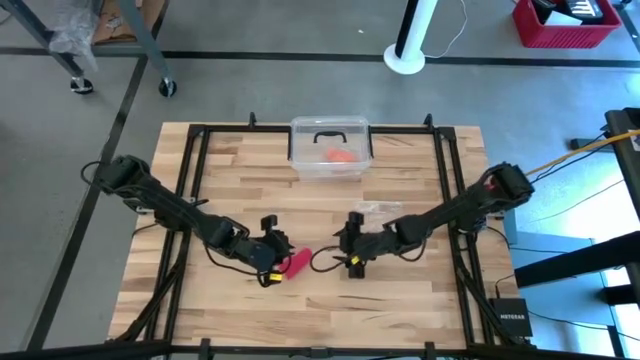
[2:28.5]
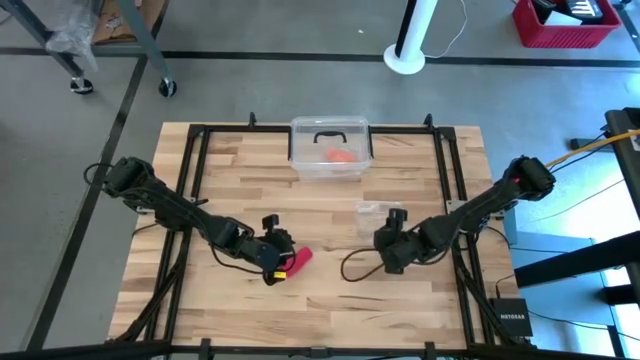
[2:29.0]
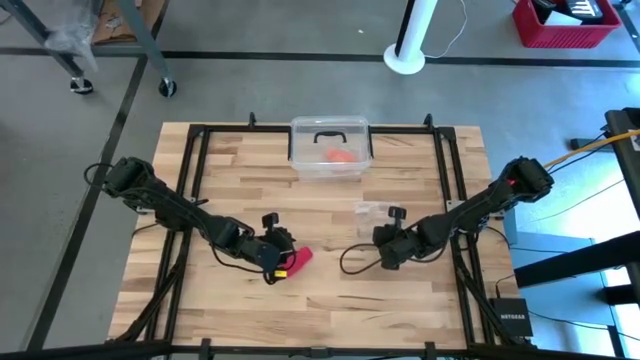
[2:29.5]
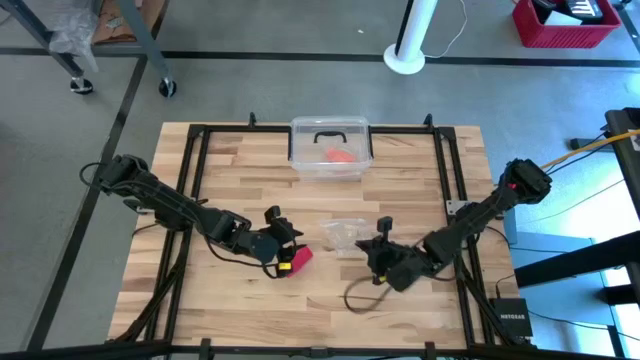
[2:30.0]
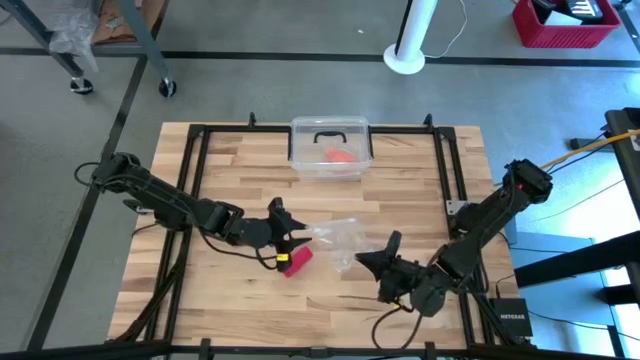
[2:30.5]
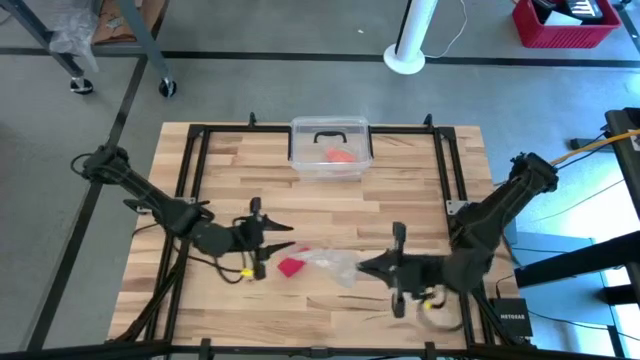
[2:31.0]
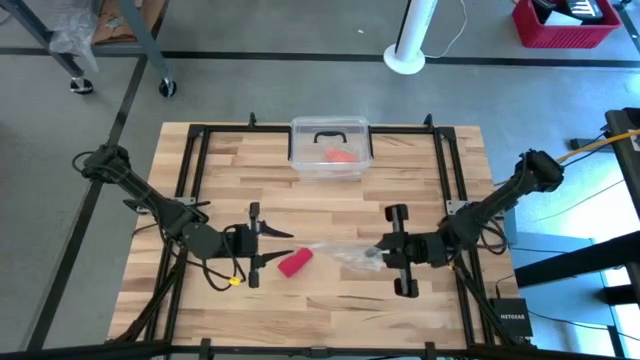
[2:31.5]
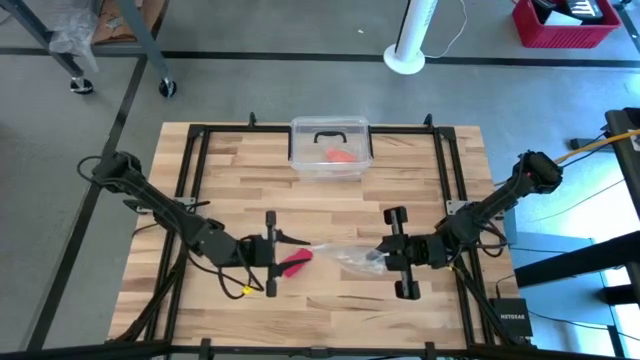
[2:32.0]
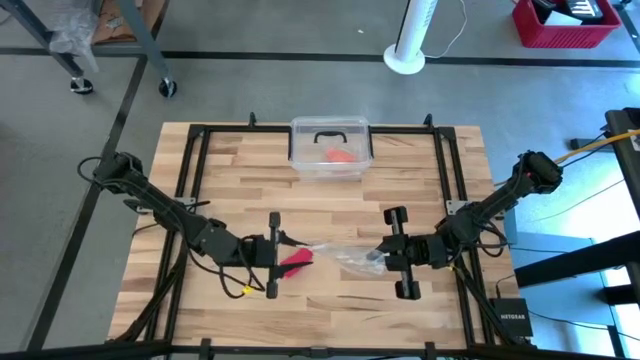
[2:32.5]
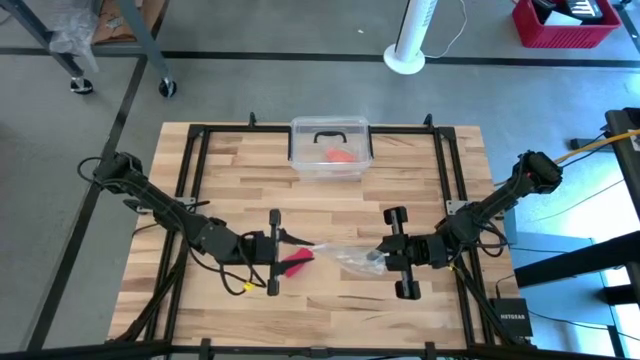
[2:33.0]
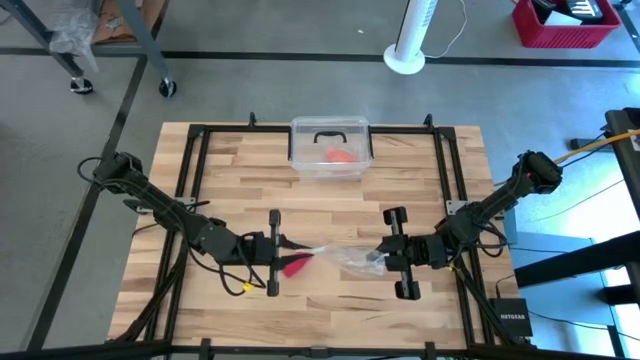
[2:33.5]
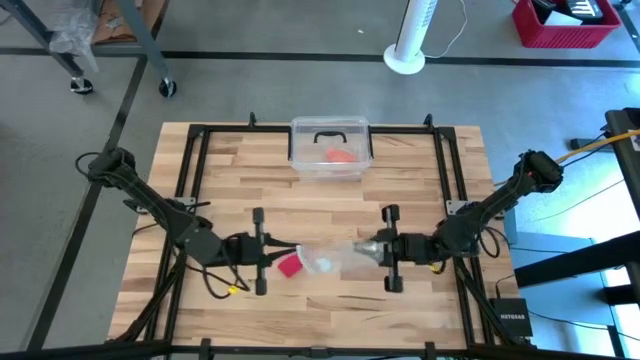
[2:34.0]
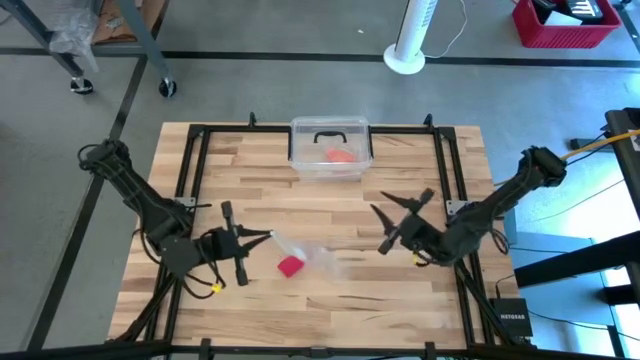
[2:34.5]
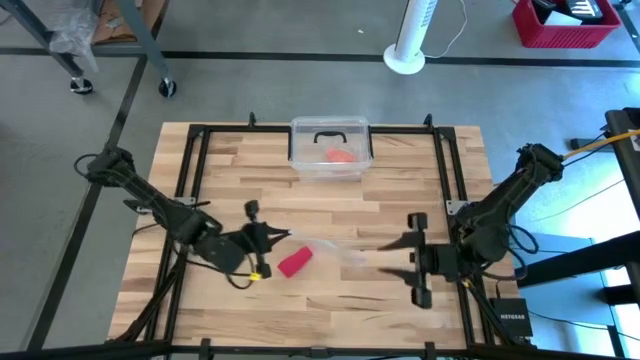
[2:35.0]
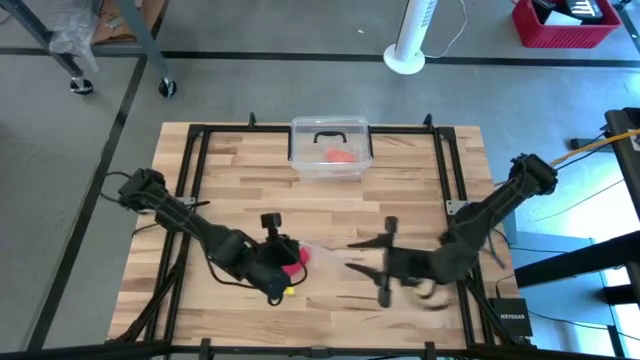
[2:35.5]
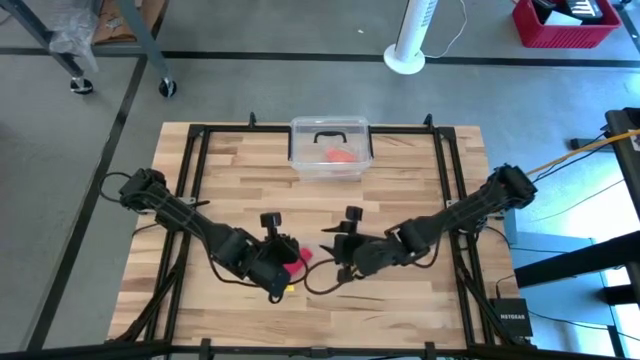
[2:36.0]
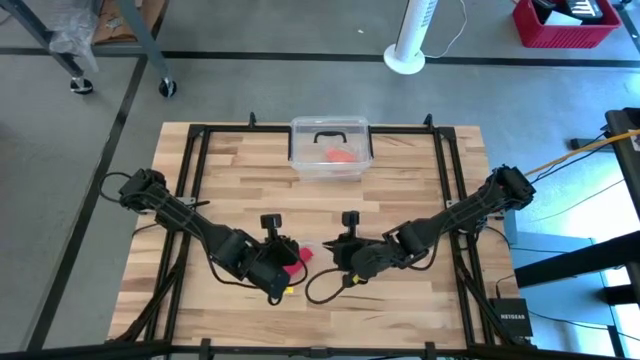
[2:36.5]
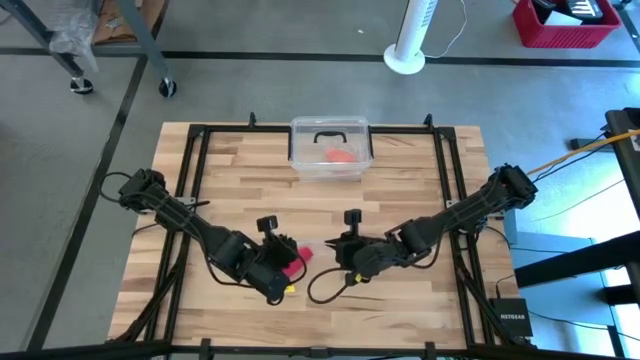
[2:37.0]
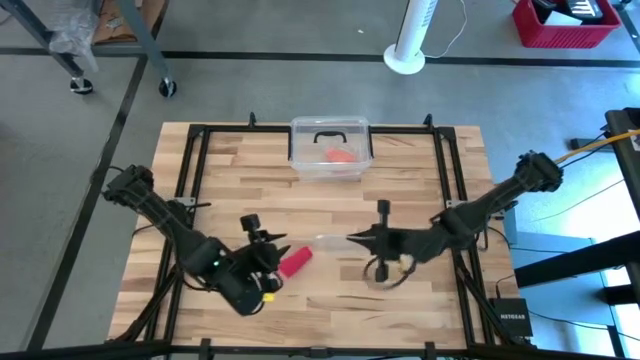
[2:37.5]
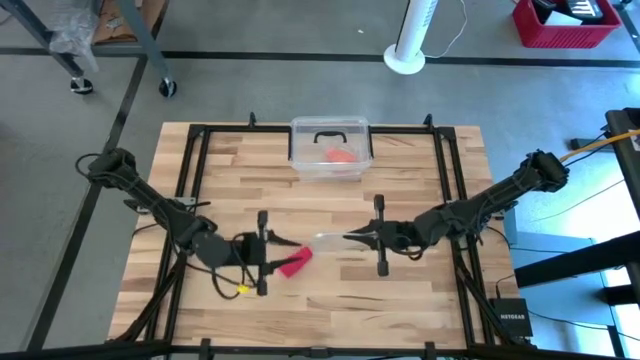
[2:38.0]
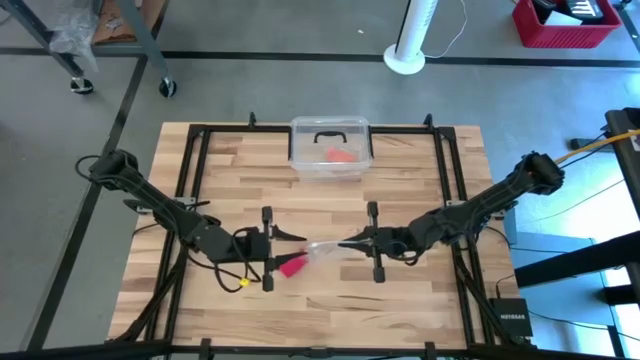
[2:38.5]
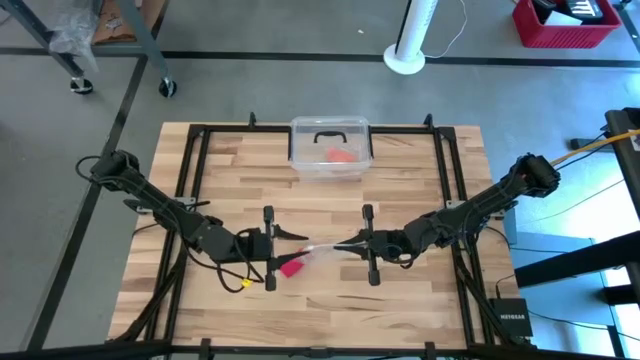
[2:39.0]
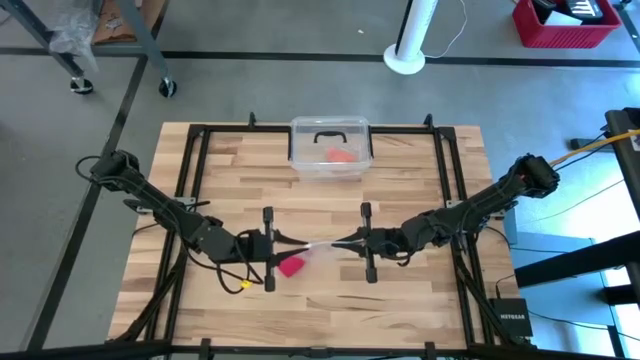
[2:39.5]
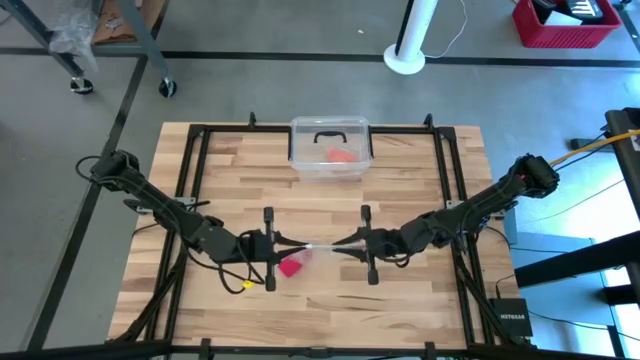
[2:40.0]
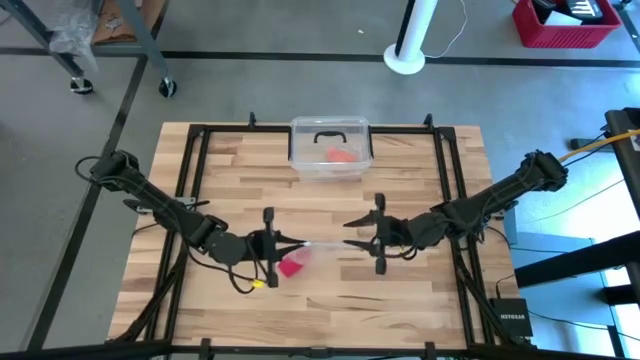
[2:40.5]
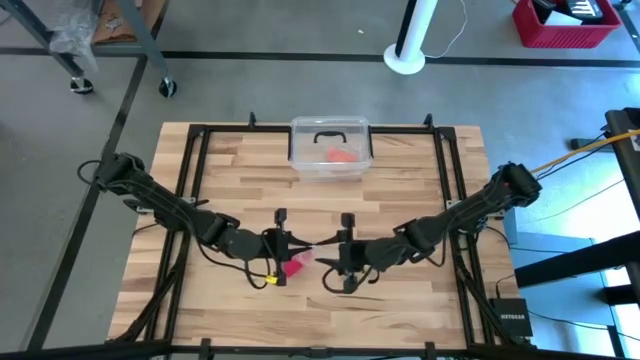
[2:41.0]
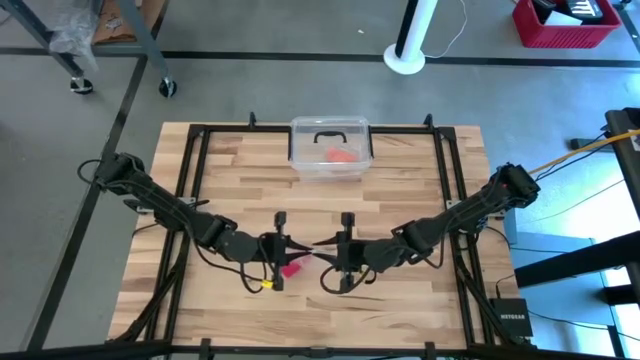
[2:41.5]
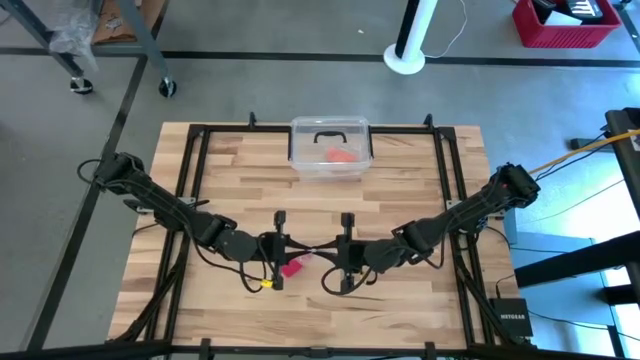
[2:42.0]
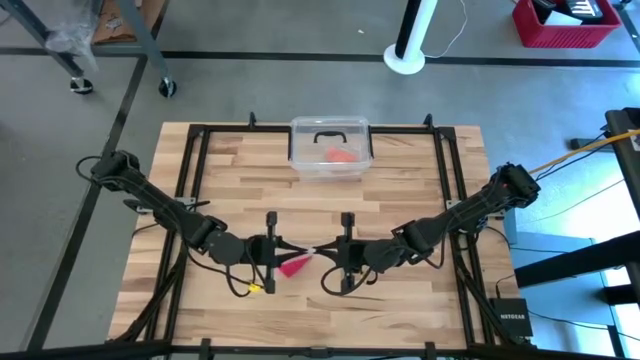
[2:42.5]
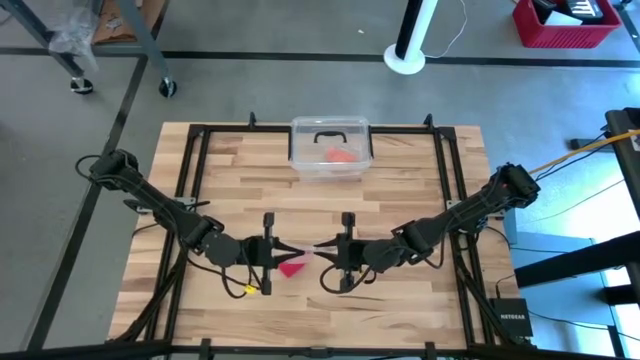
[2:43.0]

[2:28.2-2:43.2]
Task: Roll bandage
Open the transparent zip bag

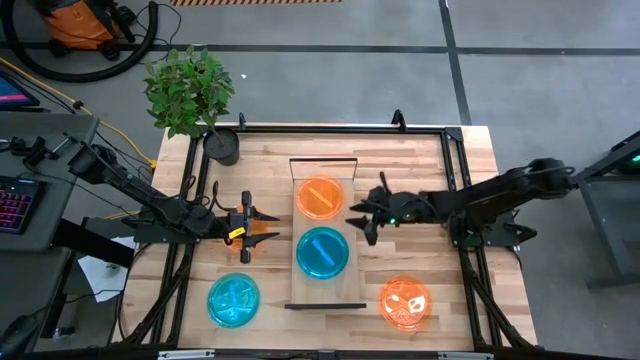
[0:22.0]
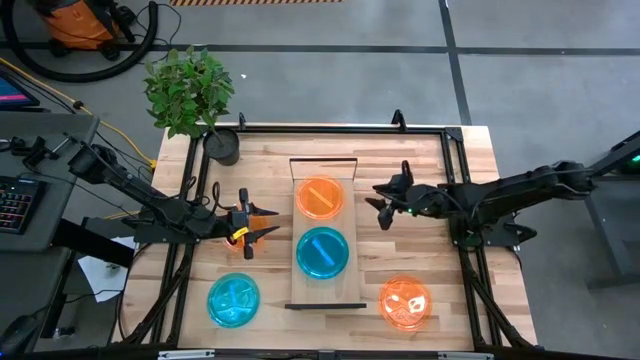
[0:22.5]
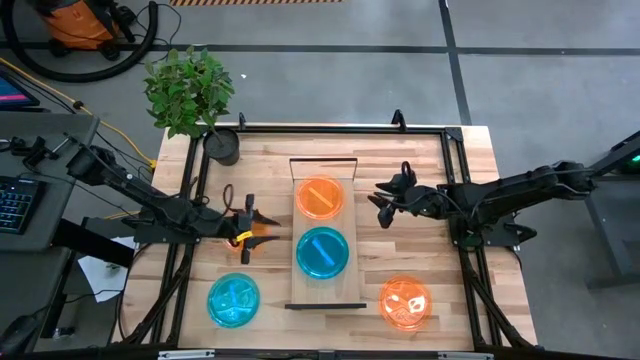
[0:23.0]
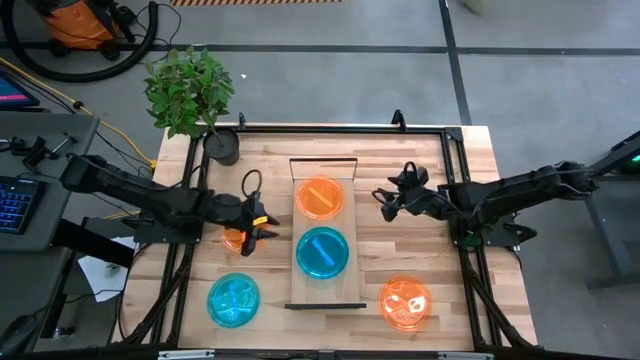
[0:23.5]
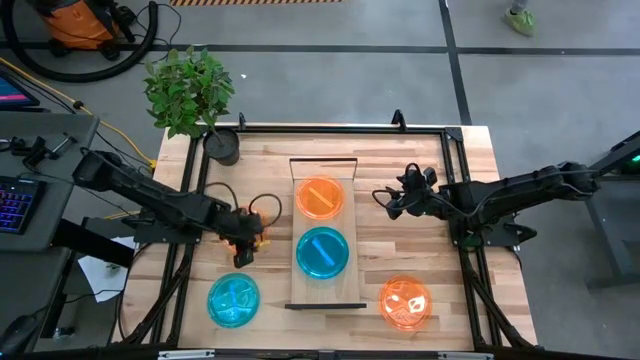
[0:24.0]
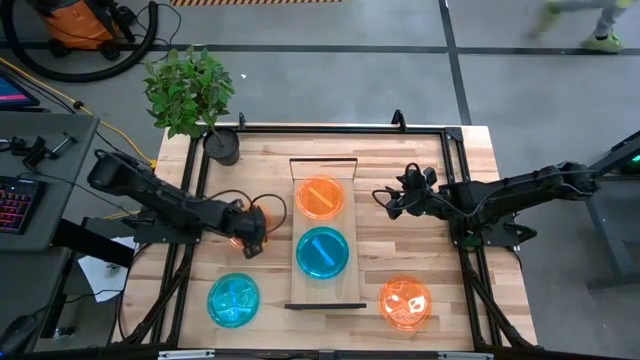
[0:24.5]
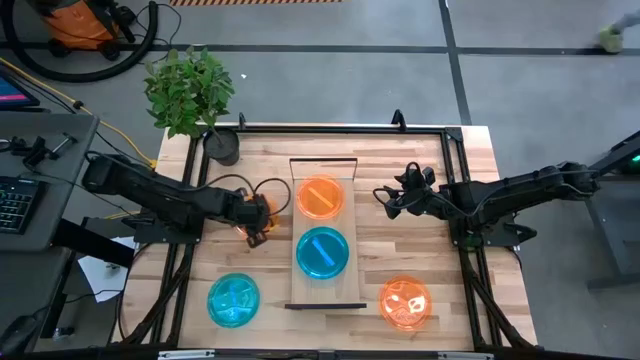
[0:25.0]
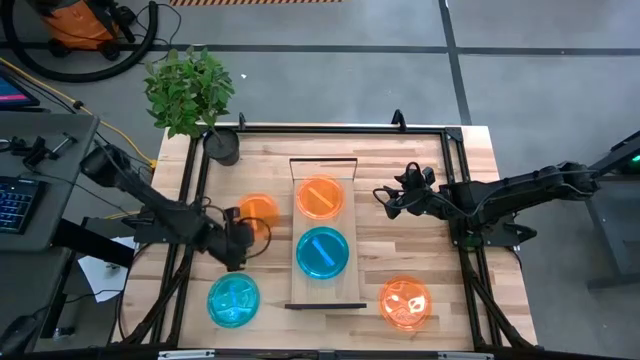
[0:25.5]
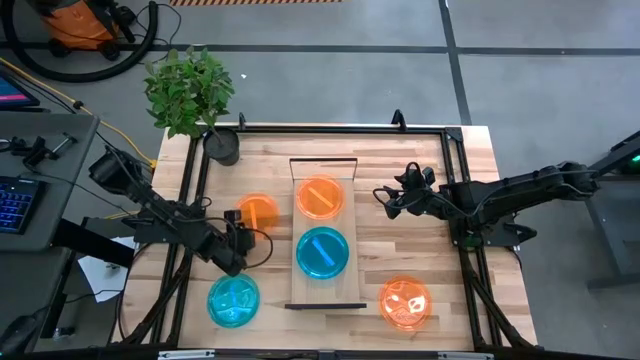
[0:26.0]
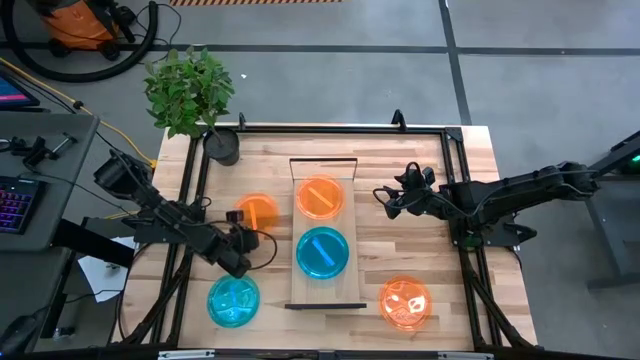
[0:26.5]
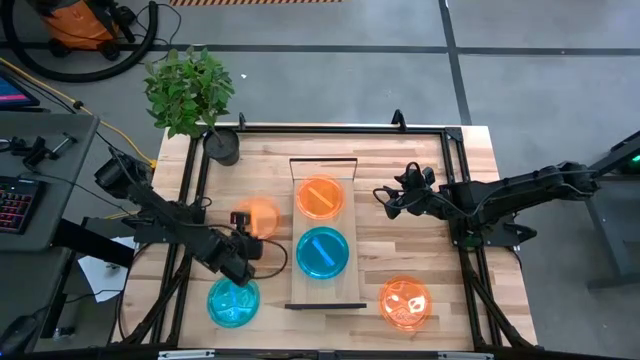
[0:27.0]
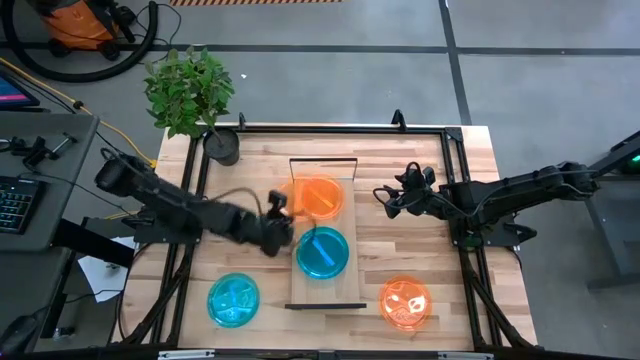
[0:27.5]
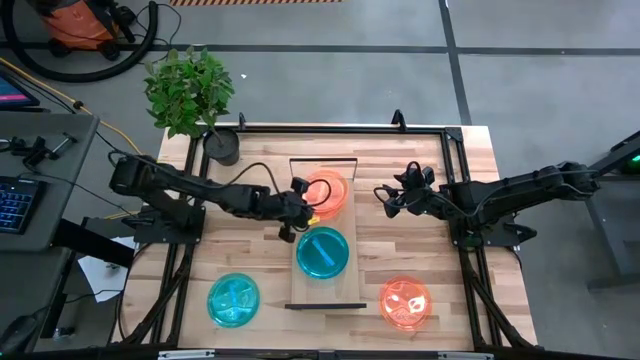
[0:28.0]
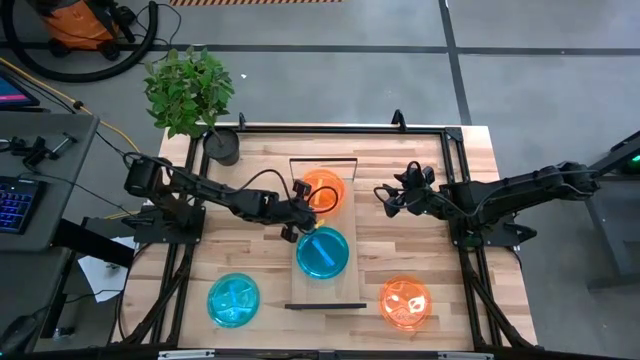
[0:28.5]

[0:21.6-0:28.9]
Task: Place and stack plates onto a shelf
Stack the left orange plate on top of the orange plate on the shelf
